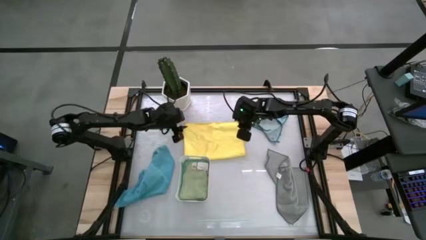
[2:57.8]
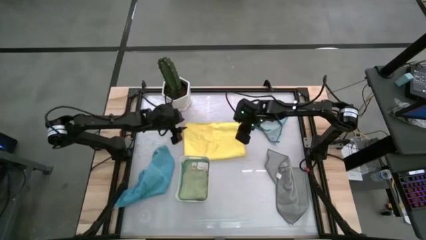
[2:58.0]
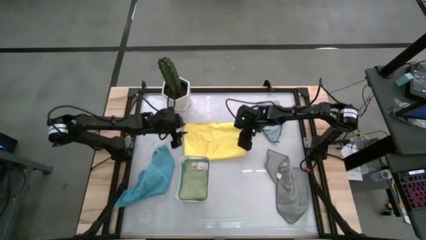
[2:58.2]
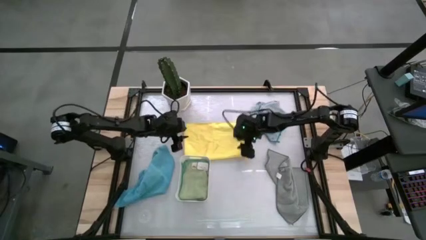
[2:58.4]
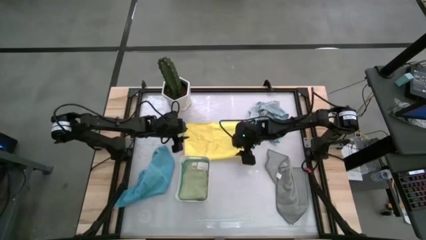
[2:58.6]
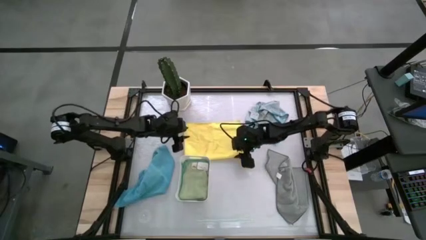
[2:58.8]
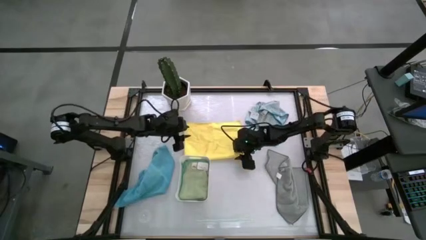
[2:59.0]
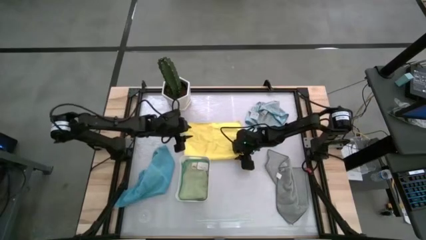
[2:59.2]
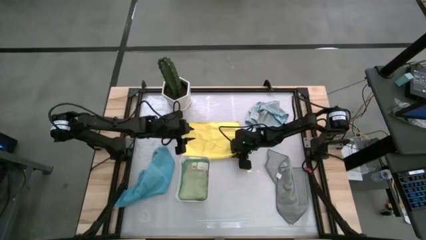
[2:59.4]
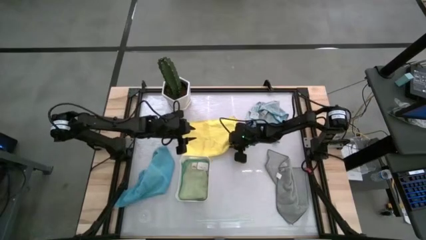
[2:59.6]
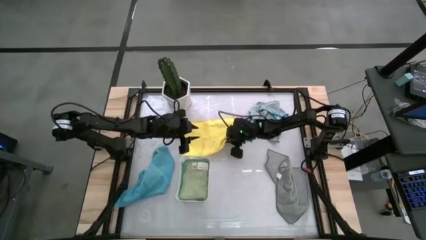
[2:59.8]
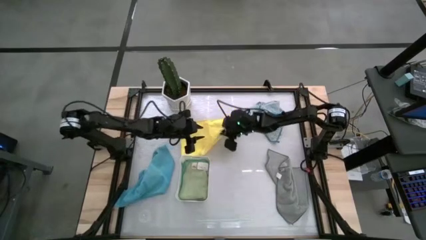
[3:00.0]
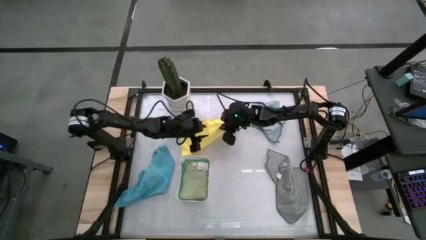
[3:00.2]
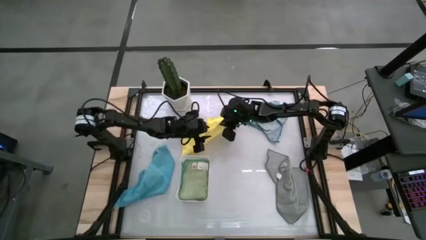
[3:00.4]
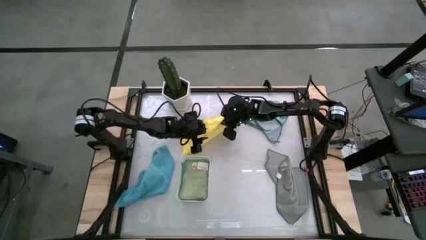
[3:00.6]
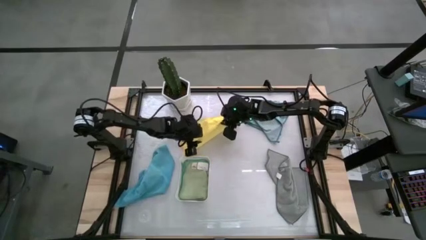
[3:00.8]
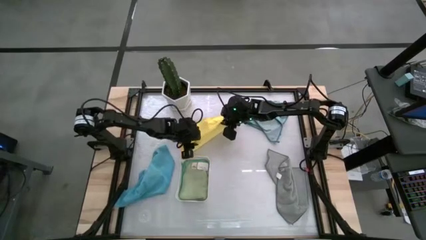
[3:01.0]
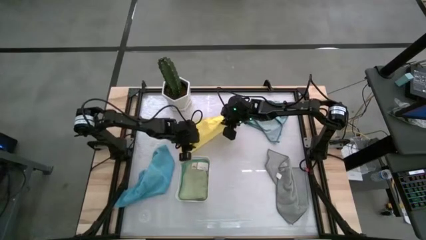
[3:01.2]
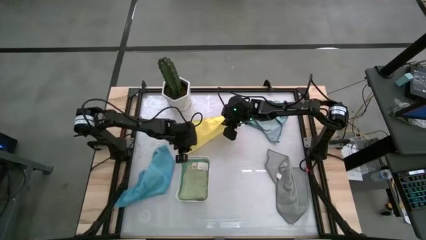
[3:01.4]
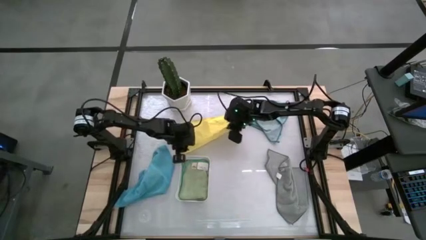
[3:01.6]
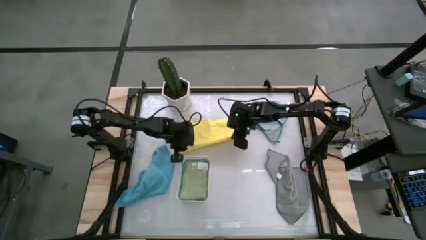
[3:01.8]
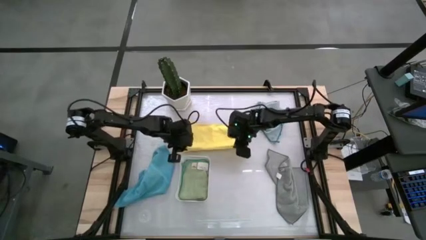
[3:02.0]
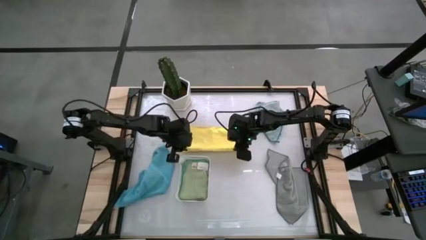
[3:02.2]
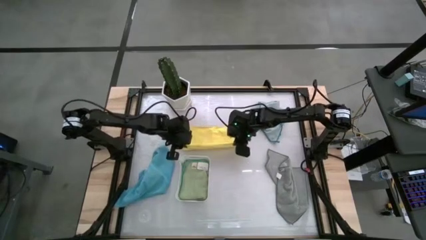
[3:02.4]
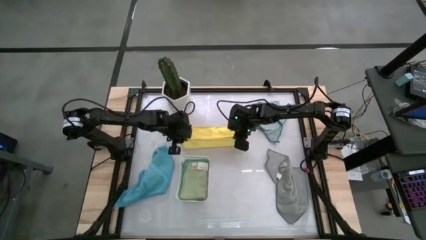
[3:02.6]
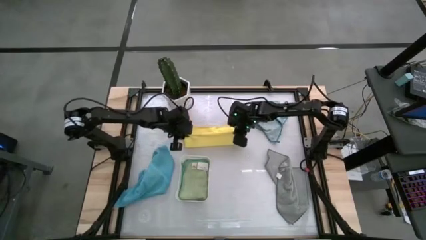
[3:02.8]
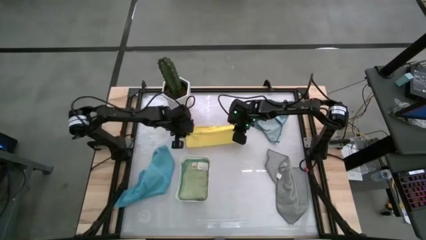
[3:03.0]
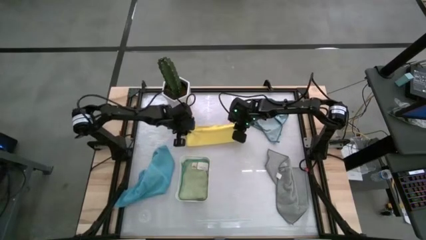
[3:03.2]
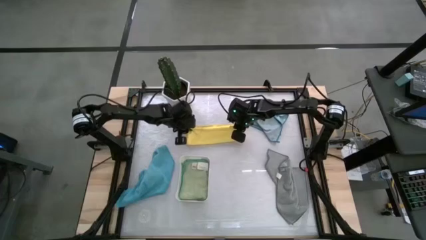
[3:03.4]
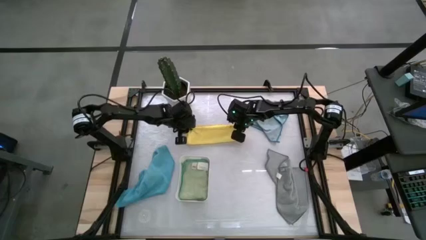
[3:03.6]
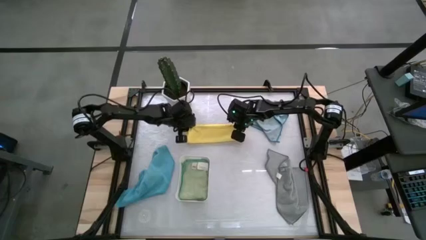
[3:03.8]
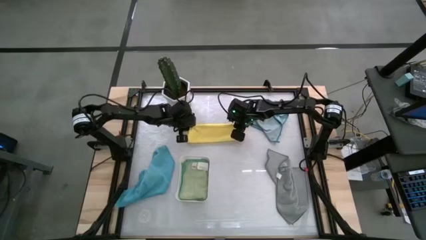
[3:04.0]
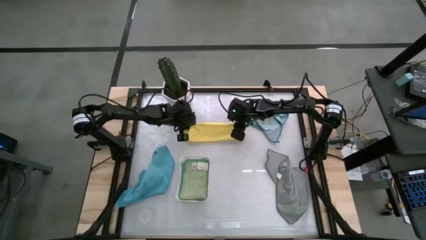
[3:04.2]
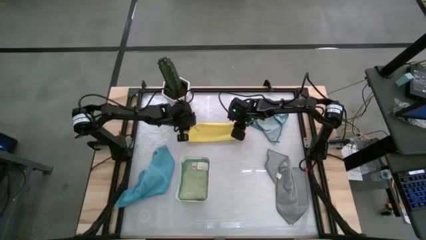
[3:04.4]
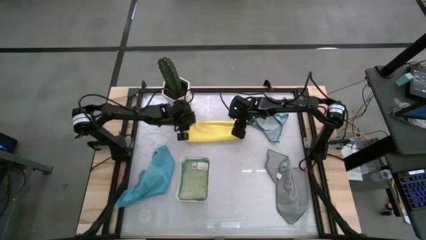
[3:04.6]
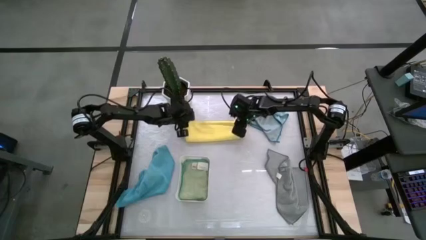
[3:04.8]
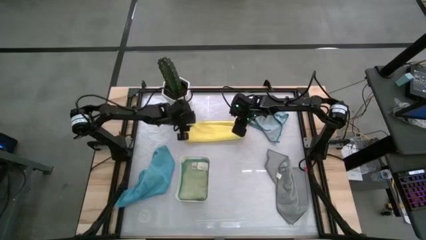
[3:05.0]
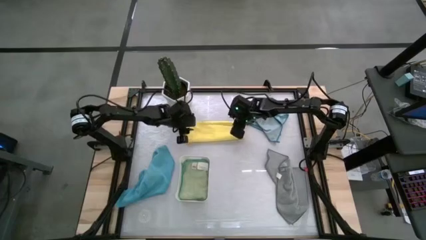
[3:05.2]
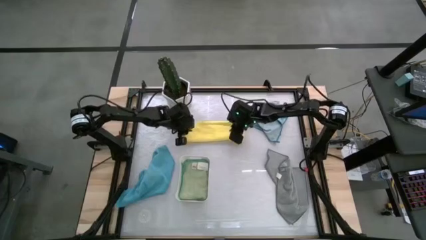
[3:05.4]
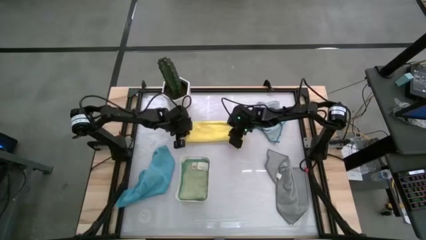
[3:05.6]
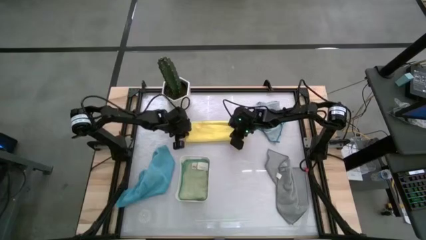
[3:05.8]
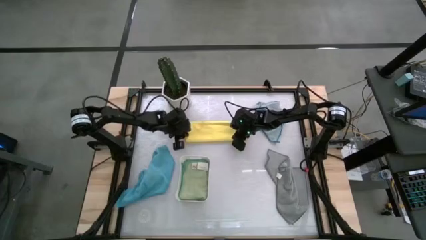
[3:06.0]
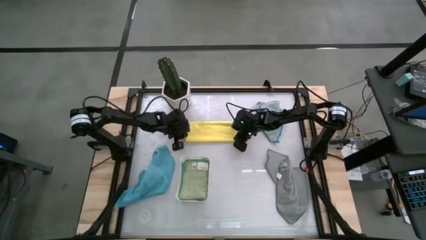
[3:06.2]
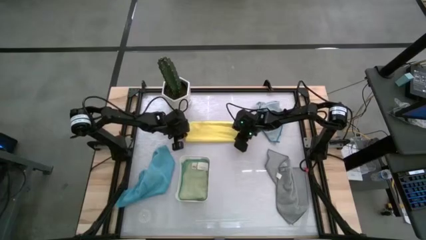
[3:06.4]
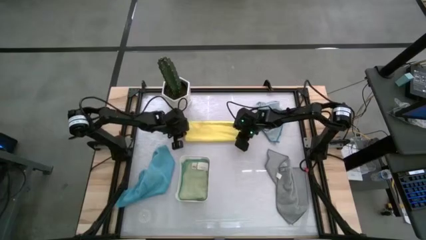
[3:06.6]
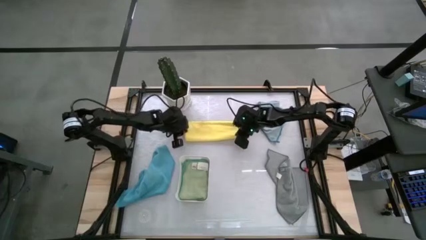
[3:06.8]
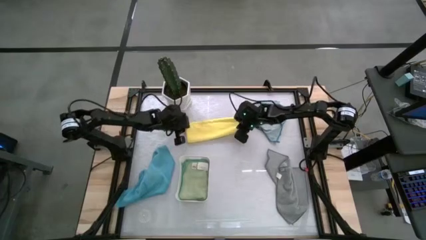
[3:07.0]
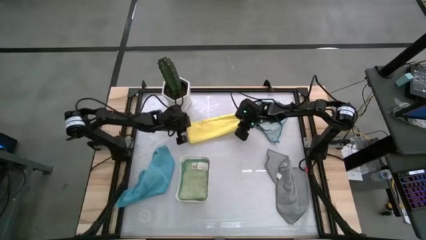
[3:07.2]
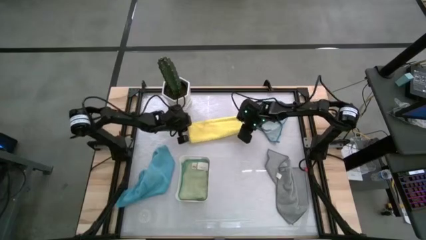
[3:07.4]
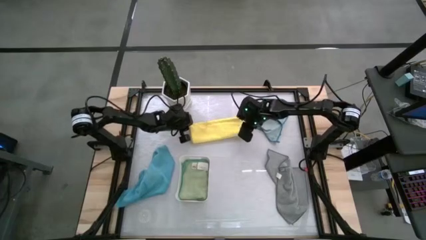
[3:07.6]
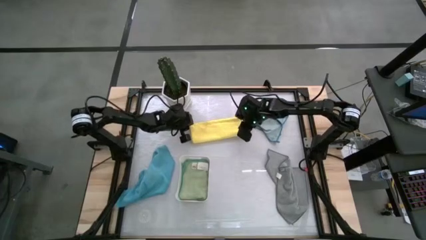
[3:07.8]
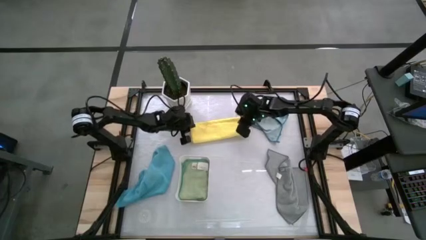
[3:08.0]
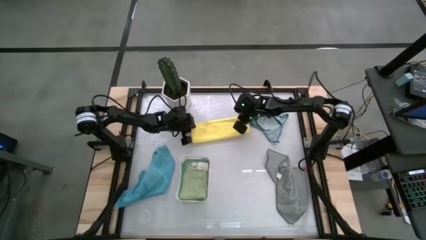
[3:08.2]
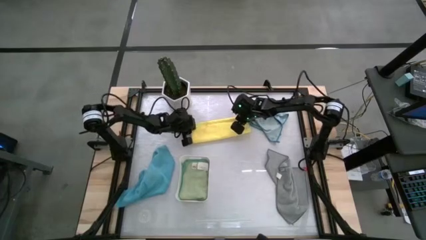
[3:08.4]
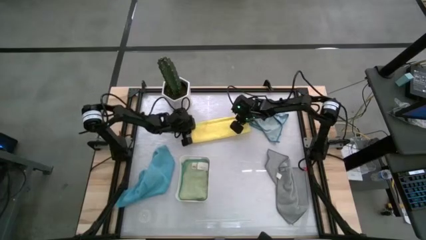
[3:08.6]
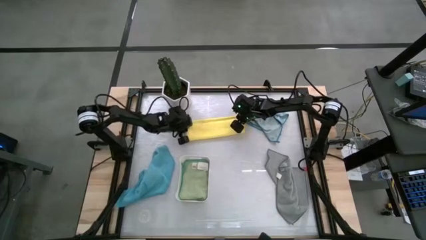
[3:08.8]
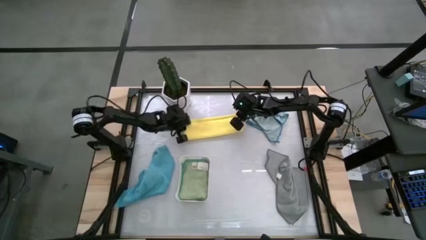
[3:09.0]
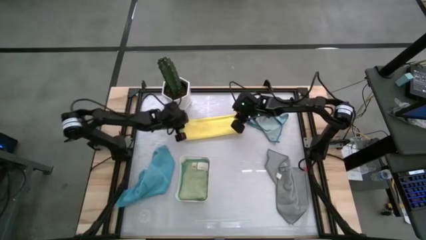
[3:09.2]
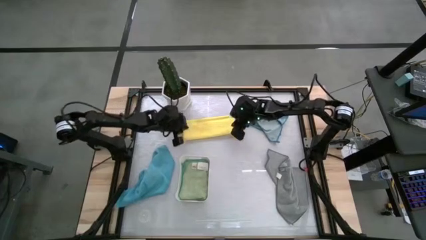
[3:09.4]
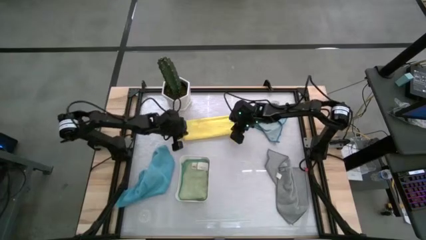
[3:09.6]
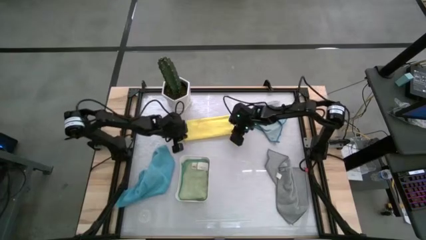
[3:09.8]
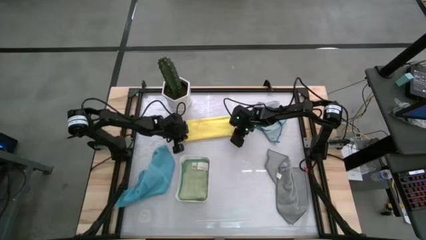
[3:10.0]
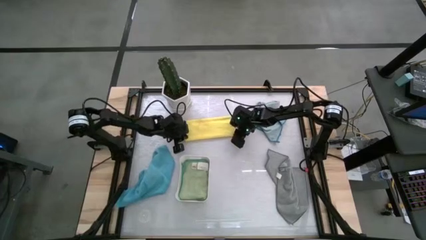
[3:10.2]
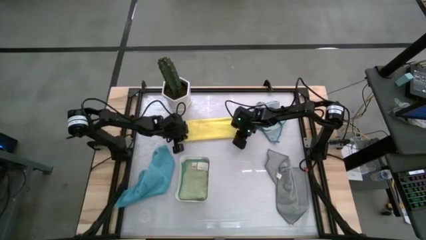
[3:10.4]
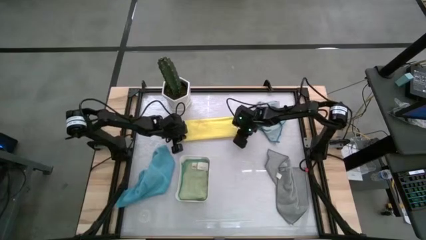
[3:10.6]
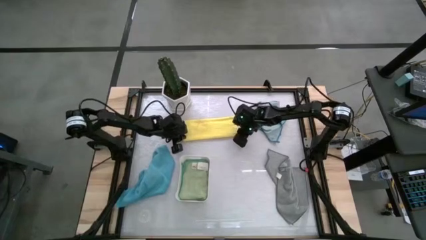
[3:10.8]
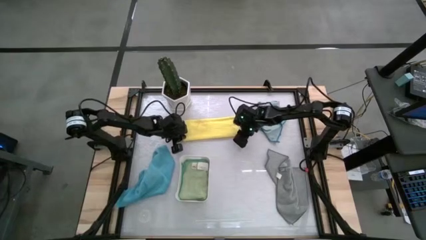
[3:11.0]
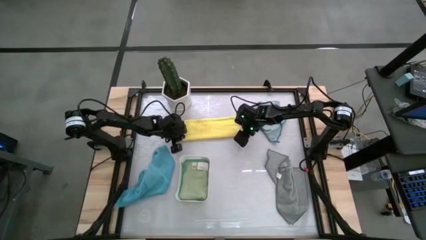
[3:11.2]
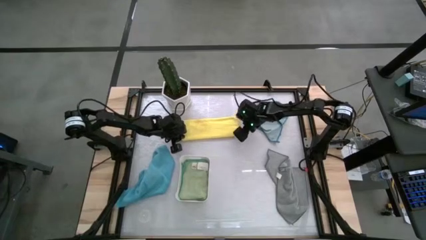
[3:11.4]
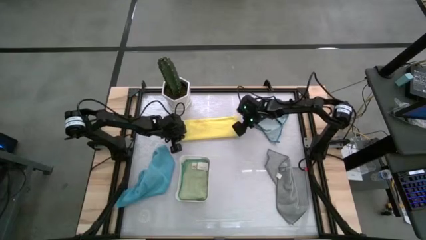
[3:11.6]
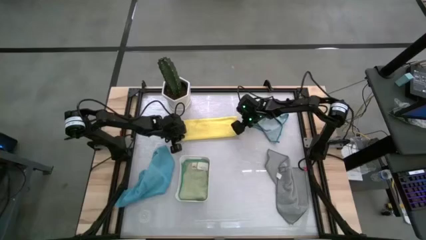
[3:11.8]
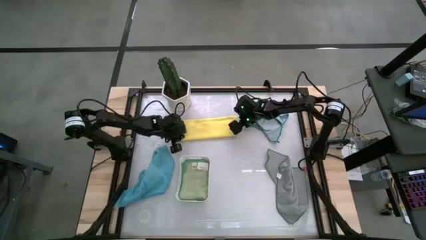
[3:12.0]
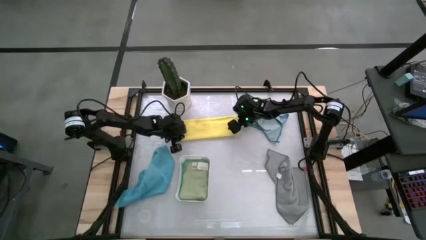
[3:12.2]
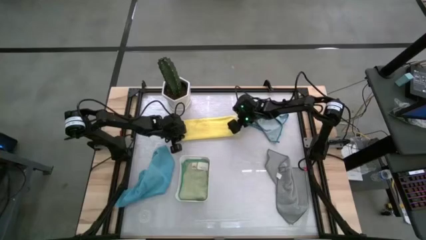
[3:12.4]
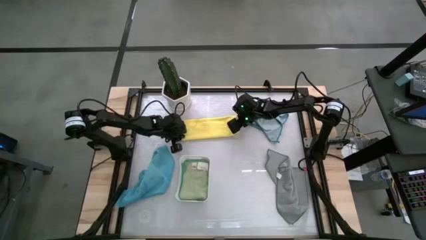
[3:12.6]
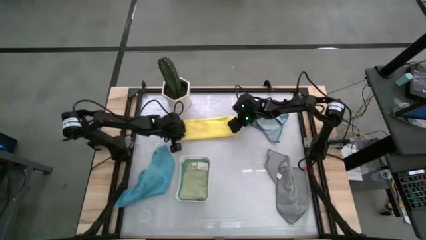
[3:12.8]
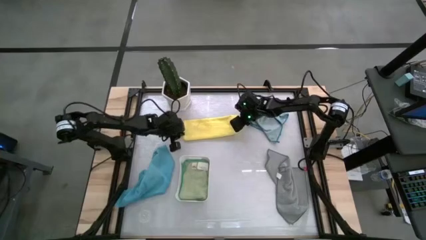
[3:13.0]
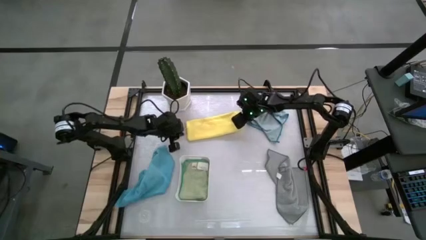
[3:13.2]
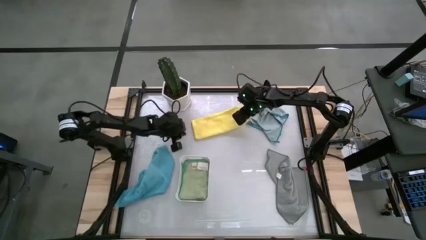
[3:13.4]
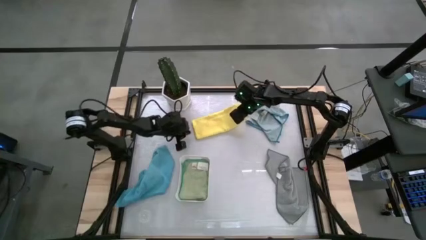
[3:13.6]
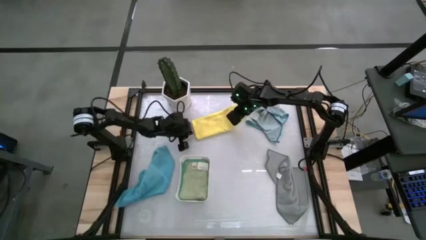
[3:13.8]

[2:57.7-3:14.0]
Task: Fold microfiber towels
Fold the yellow microfiber towel
